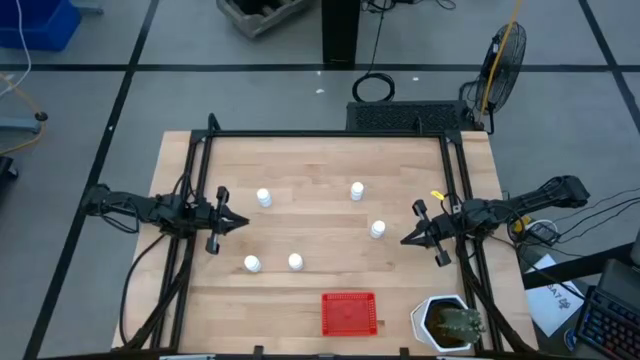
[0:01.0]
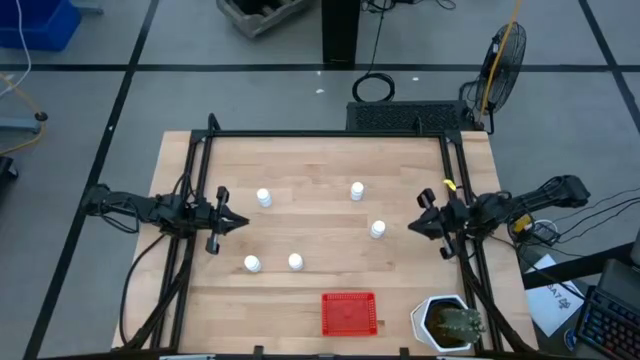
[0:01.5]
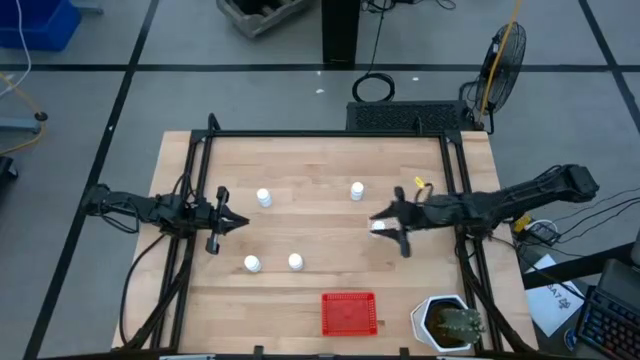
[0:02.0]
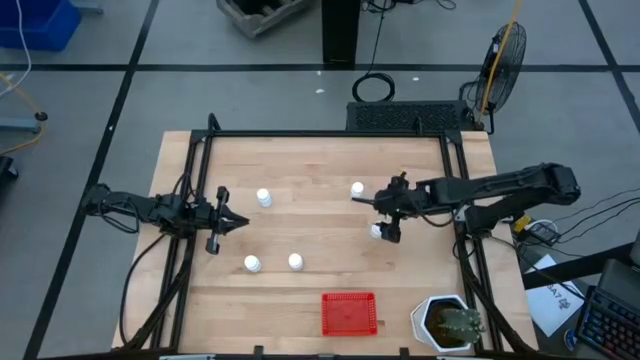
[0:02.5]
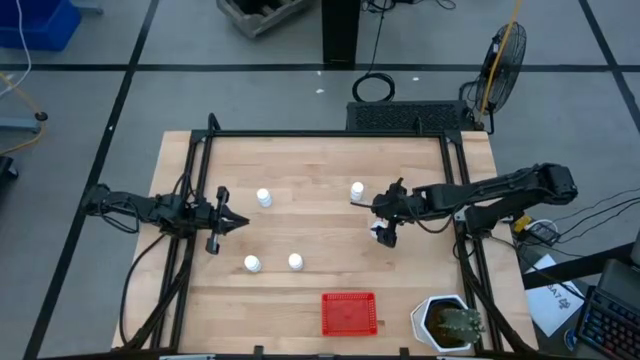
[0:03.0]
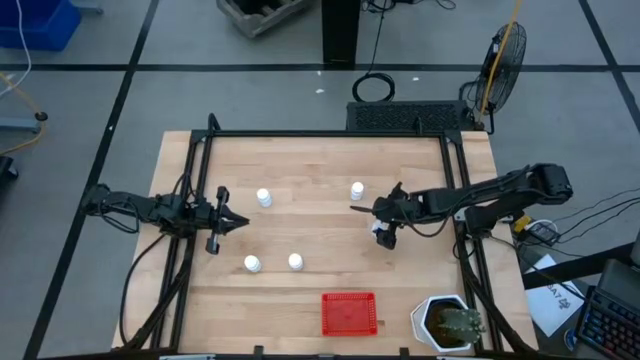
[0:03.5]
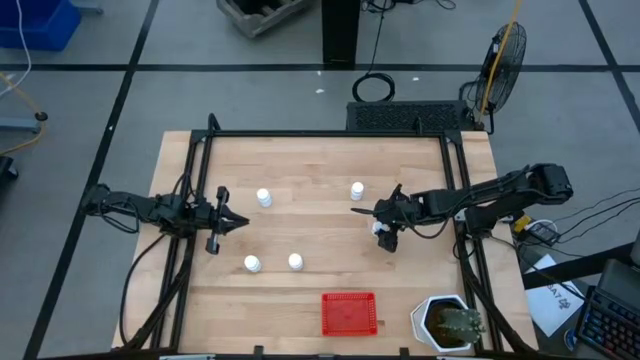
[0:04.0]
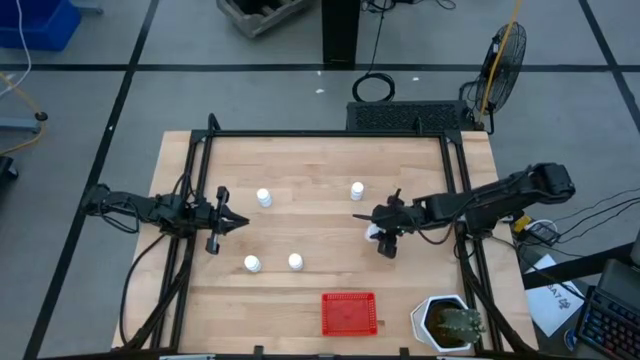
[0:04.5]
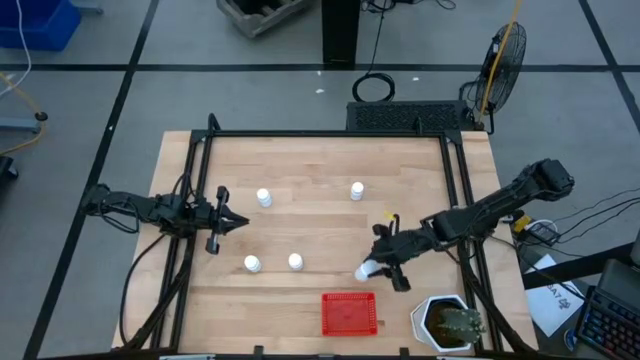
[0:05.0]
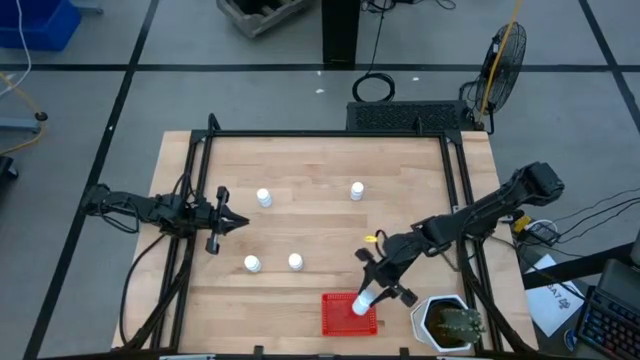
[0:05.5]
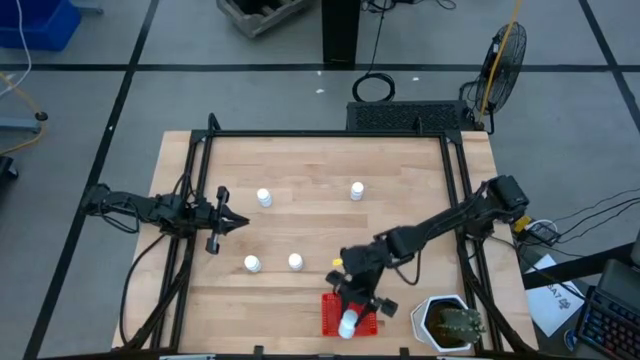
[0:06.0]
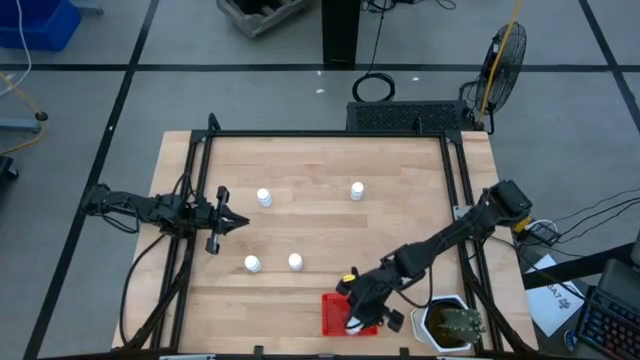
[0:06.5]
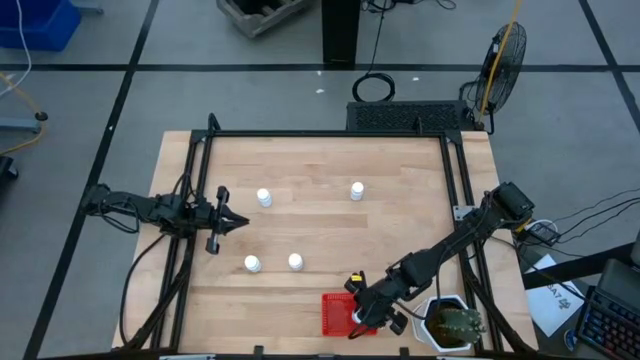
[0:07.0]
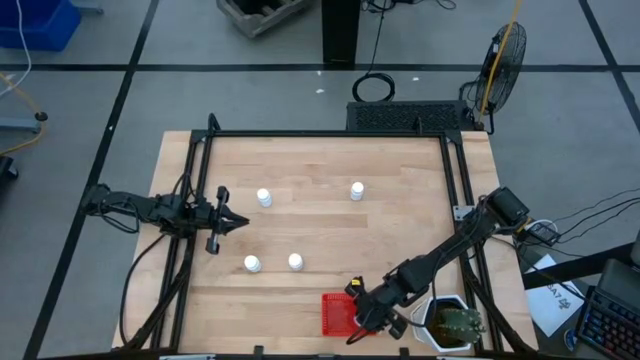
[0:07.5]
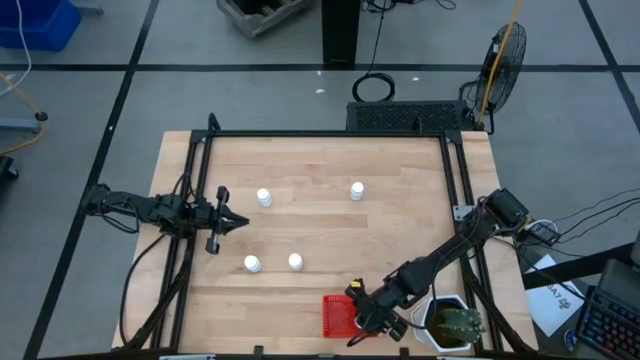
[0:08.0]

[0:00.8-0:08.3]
Task: Pick and place pill bottles into a basket
Put the white pill bottle into the red basket

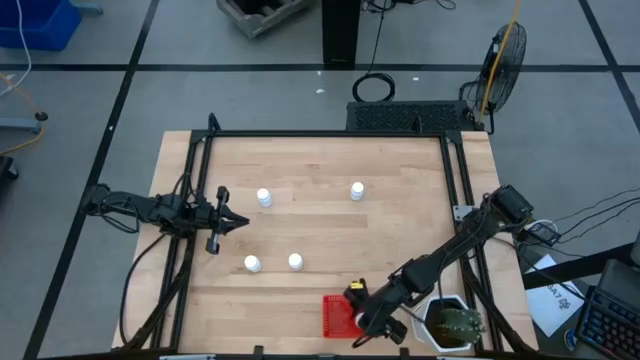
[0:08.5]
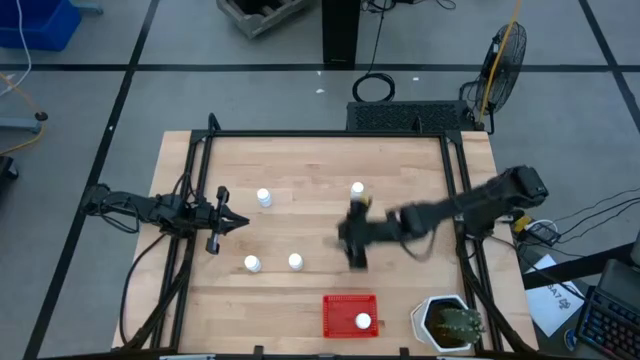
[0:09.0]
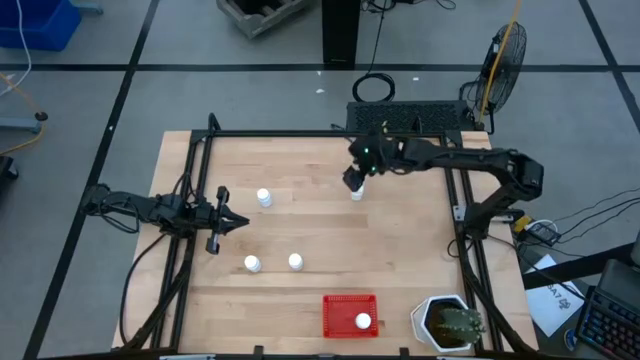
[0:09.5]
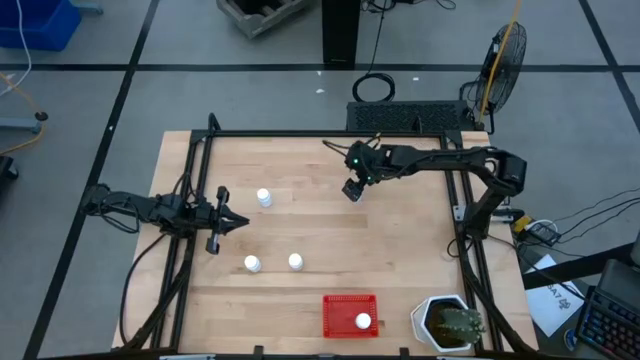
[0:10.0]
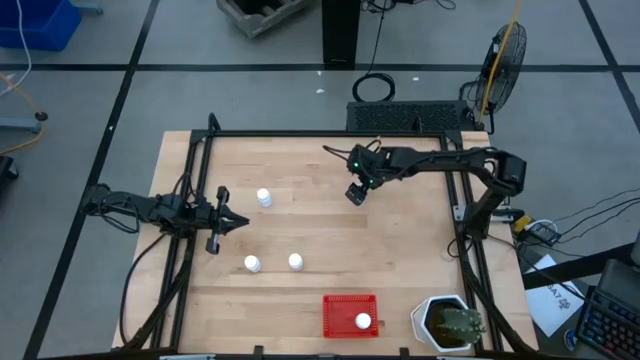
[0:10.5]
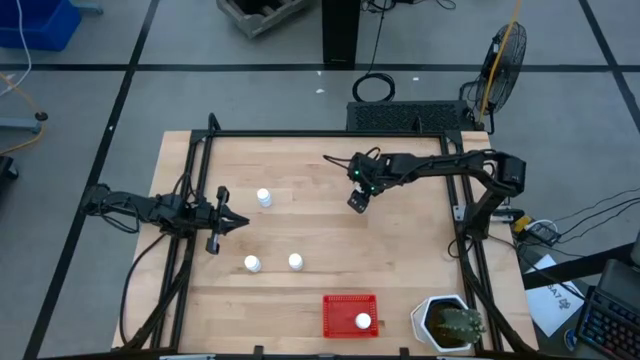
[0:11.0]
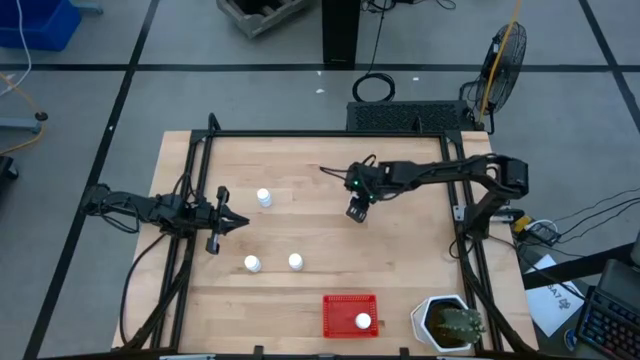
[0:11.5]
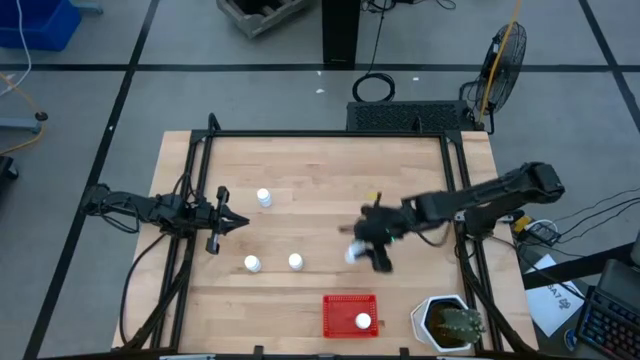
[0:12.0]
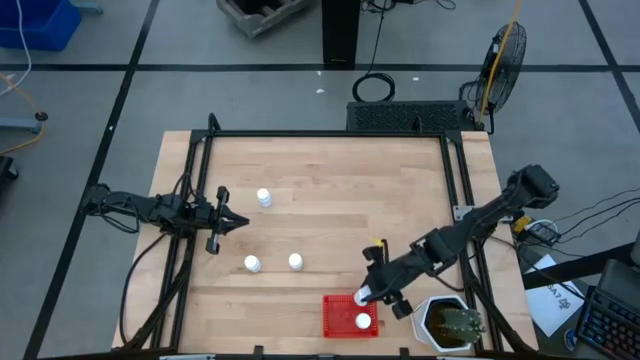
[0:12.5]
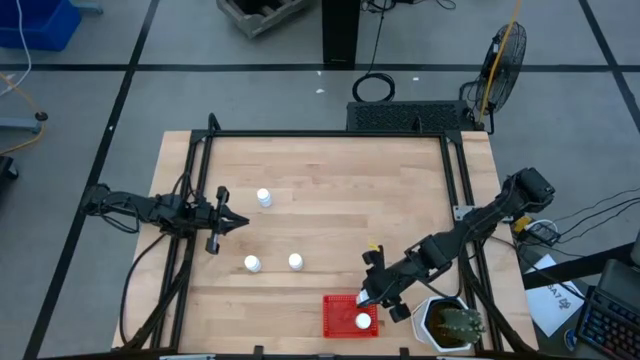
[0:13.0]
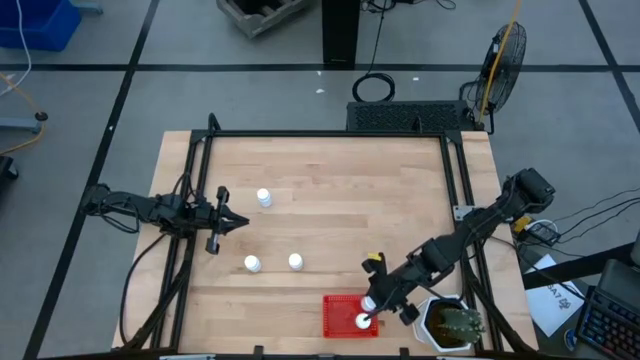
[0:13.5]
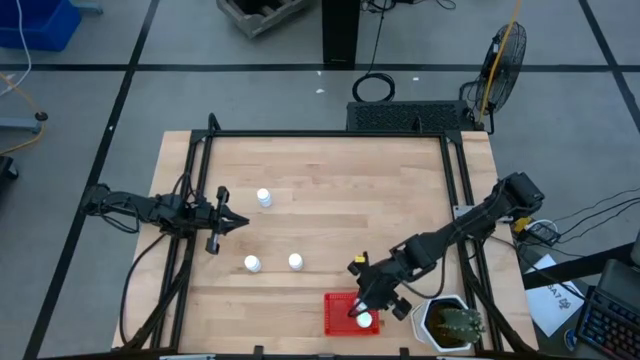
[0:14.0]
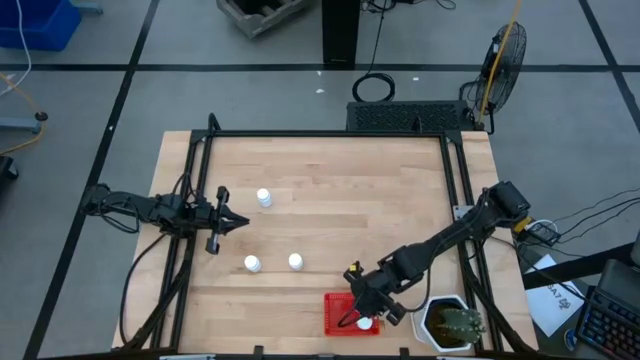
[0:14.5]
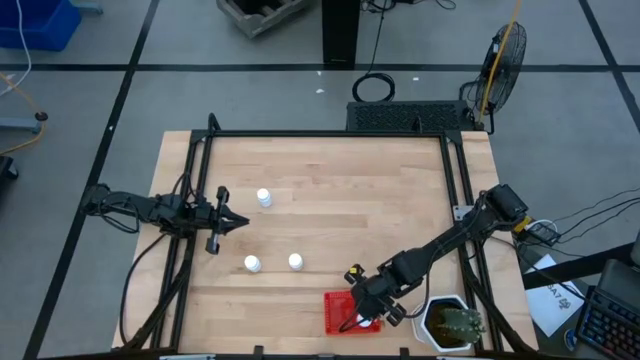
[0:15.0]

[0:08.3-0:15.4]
Put the white pill bottle into the red basket

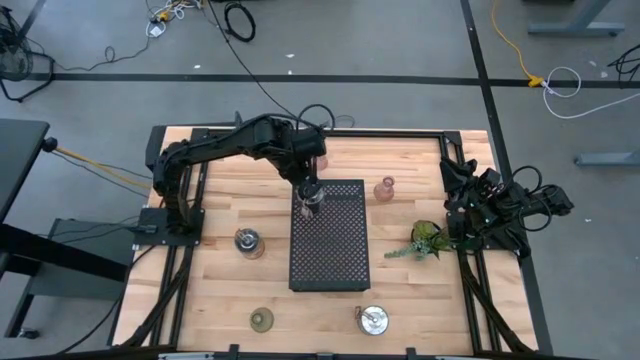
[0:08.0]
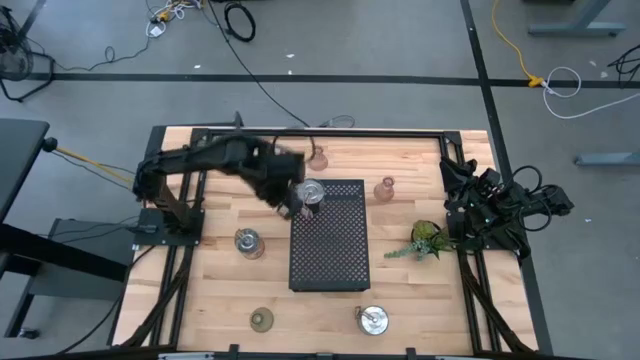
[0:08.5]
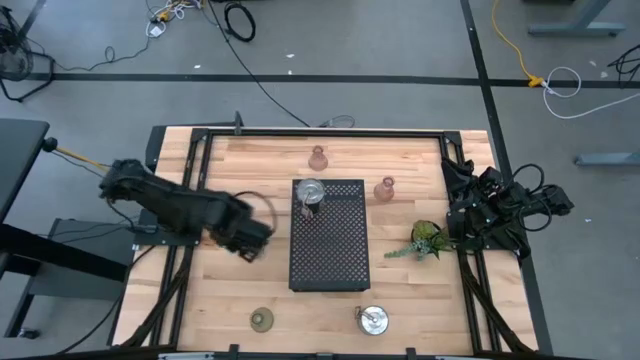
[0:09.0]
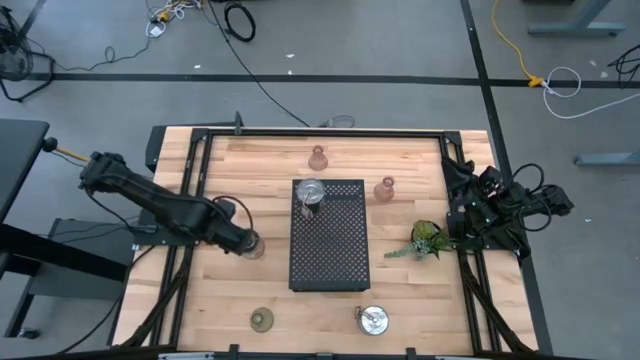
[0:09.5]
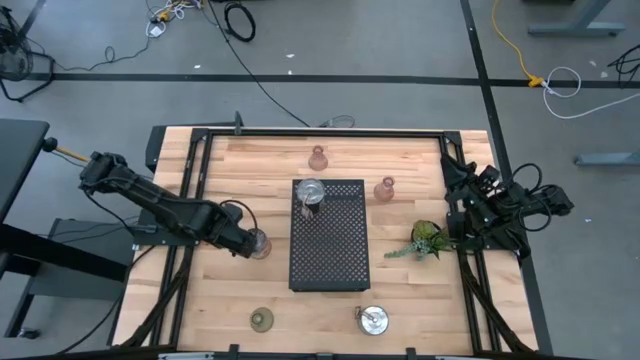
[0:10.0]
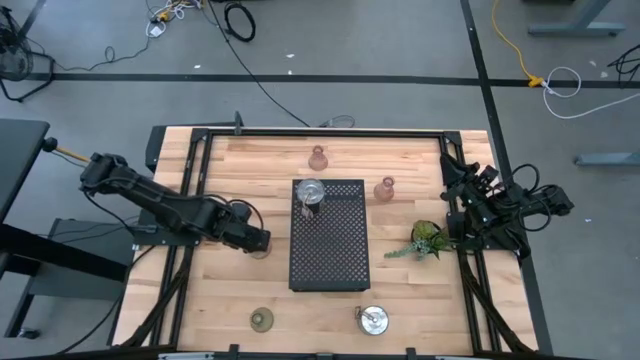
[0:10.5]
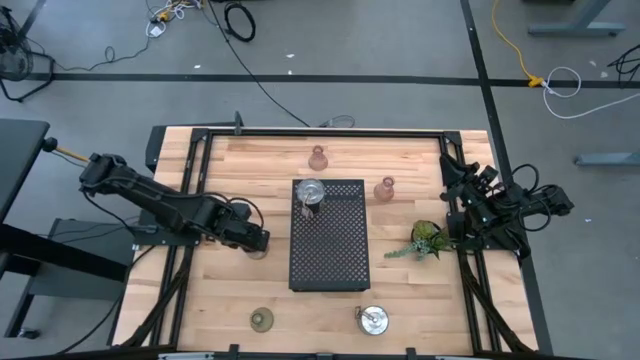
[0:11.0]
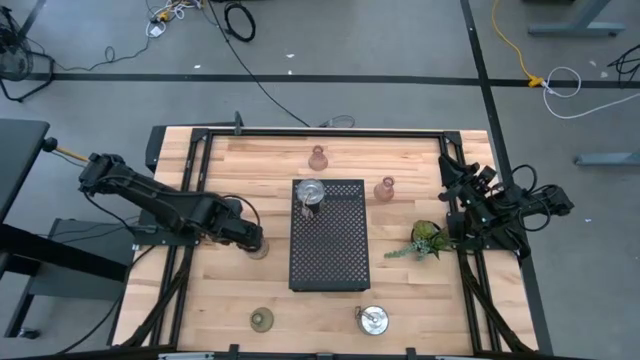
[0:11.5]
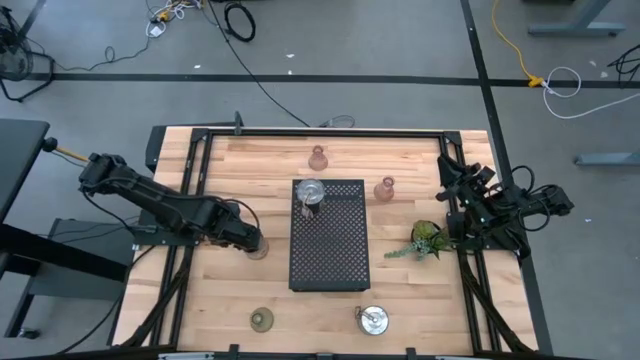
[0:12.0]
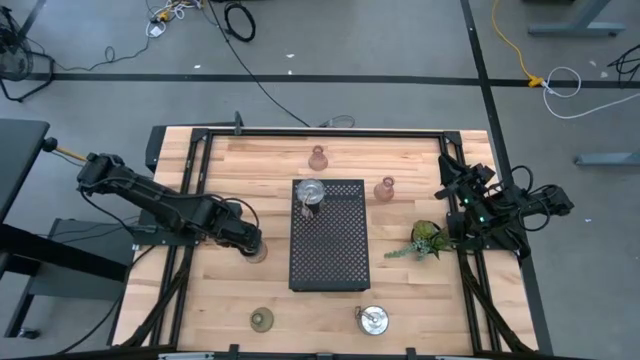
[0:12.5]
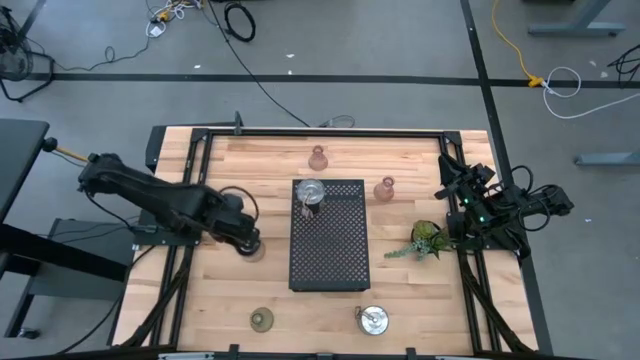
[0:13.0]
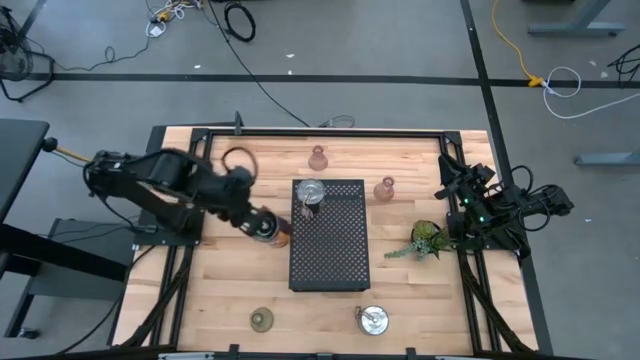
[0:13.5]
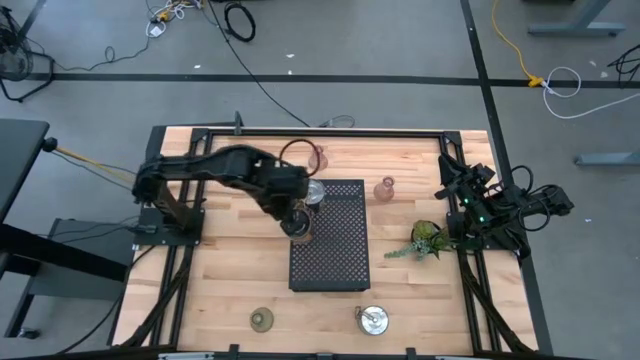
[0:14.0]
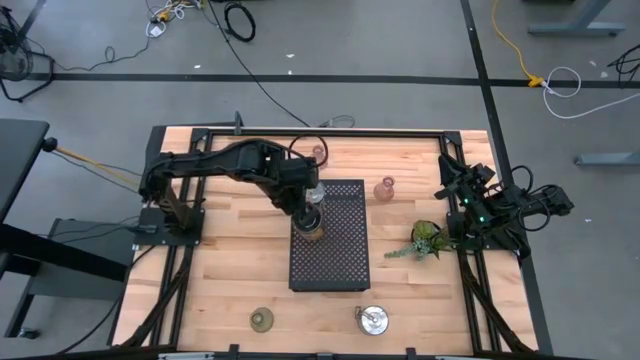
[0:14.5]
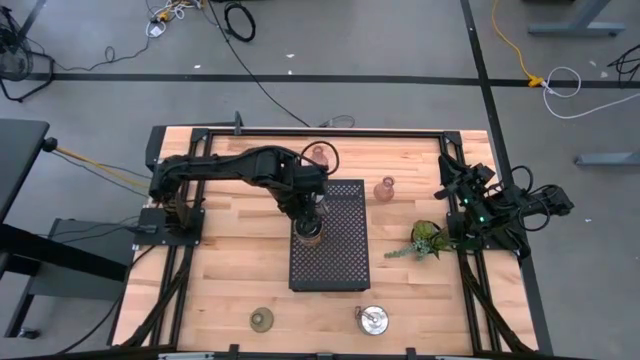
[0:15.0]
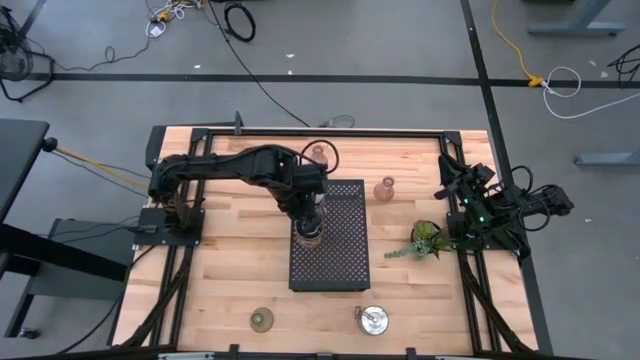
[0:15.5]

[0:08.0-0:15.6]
Task: Pick & Place candle stick holders
Put the orange scented candle on the shelf
